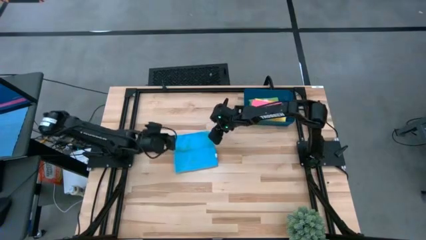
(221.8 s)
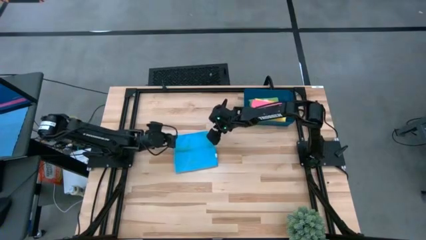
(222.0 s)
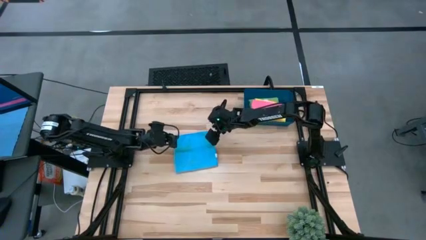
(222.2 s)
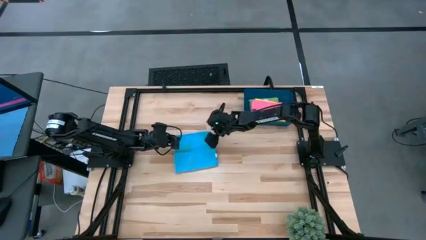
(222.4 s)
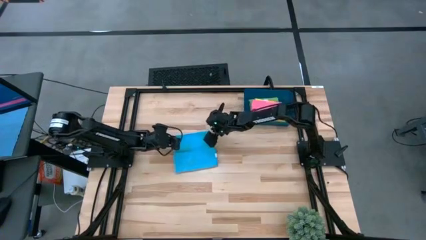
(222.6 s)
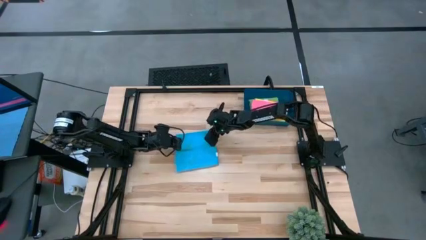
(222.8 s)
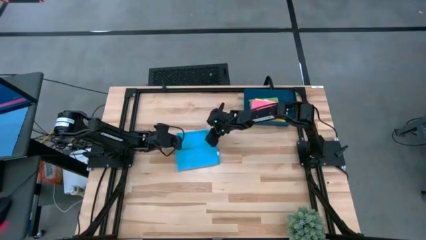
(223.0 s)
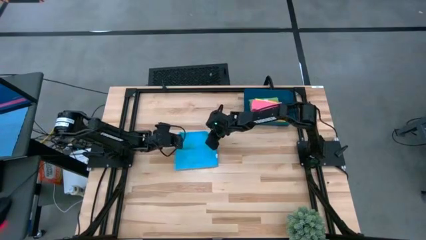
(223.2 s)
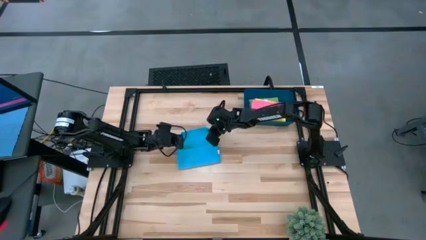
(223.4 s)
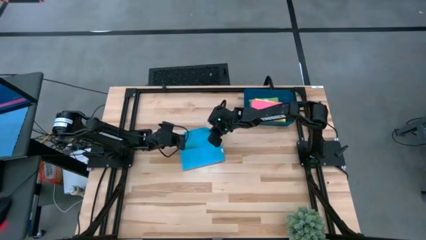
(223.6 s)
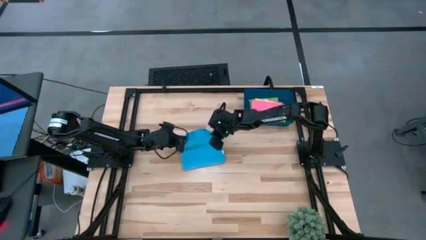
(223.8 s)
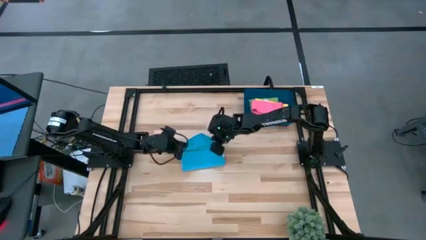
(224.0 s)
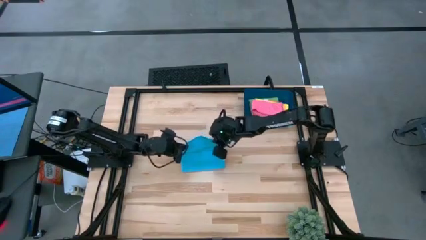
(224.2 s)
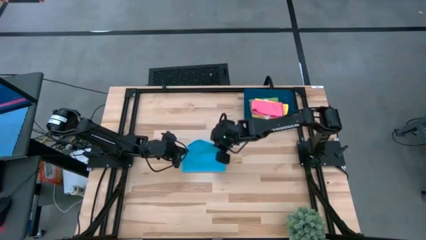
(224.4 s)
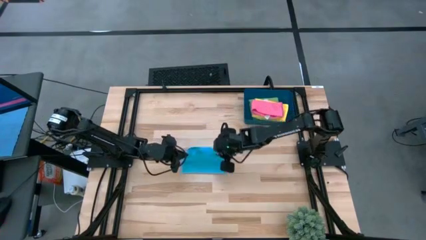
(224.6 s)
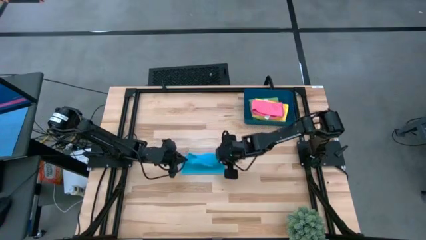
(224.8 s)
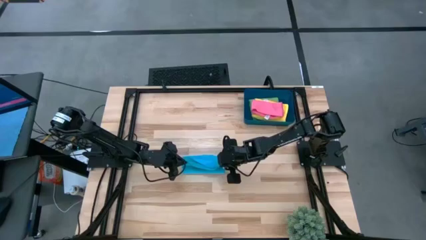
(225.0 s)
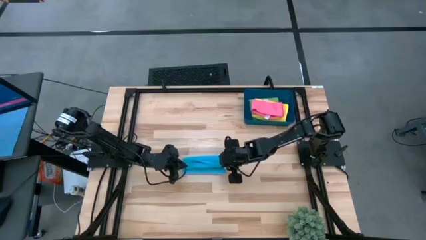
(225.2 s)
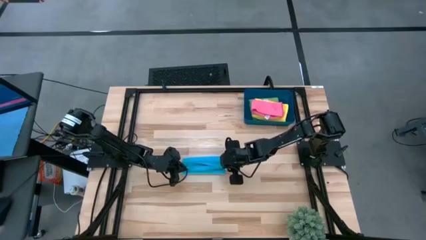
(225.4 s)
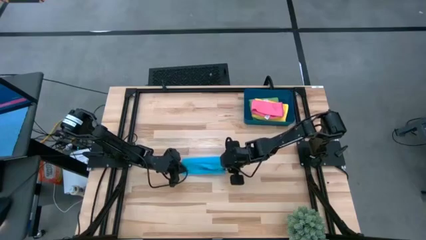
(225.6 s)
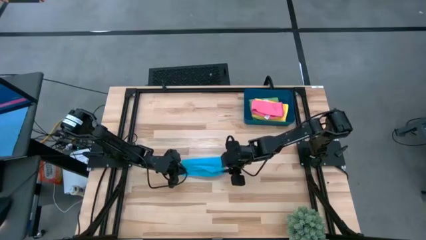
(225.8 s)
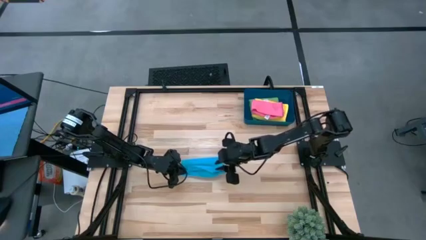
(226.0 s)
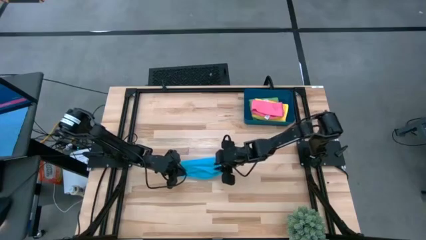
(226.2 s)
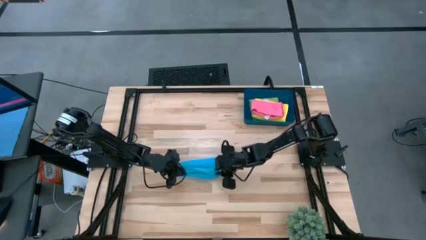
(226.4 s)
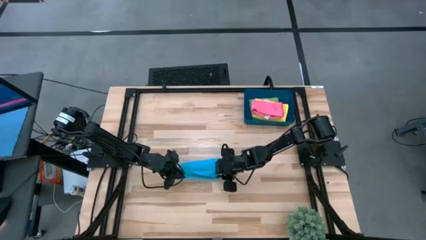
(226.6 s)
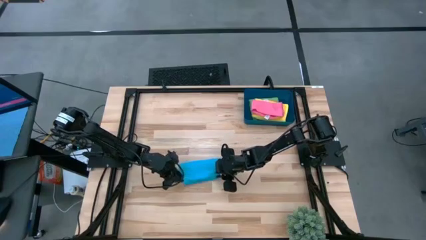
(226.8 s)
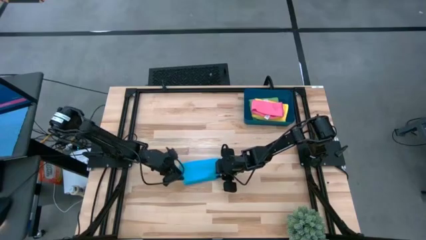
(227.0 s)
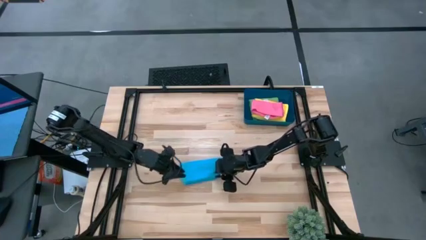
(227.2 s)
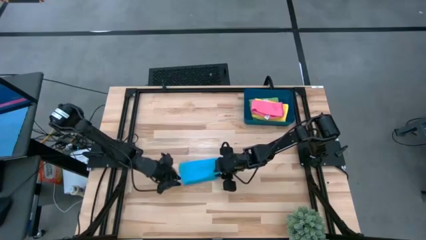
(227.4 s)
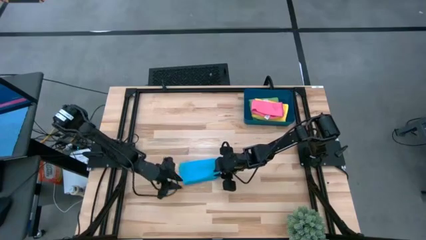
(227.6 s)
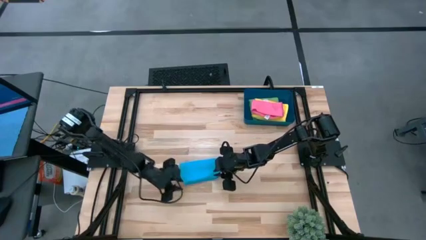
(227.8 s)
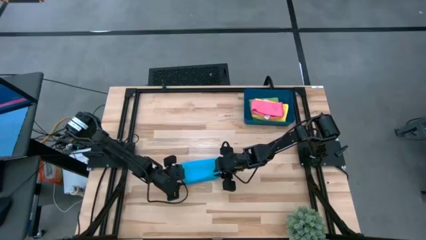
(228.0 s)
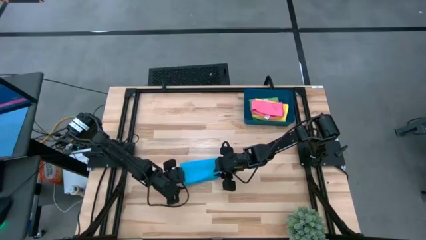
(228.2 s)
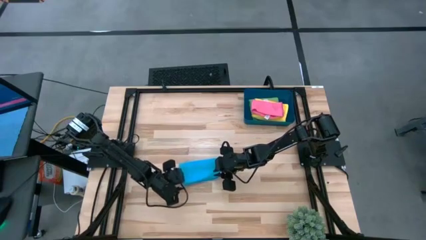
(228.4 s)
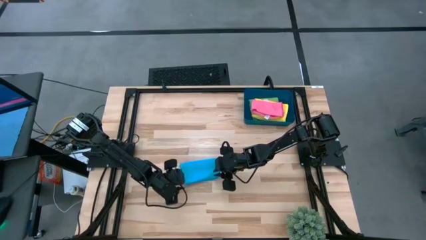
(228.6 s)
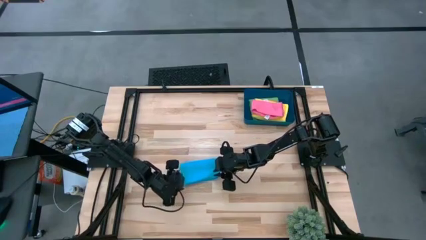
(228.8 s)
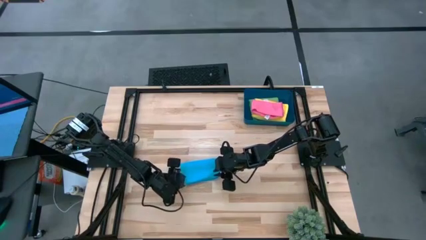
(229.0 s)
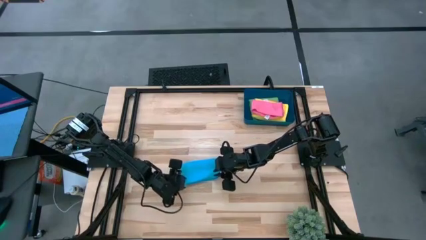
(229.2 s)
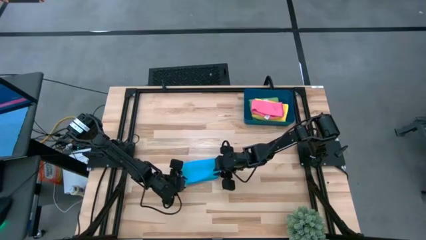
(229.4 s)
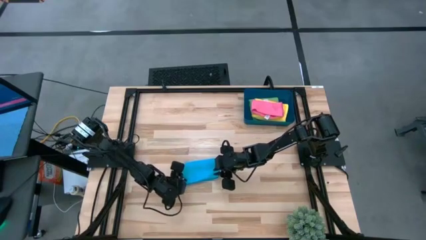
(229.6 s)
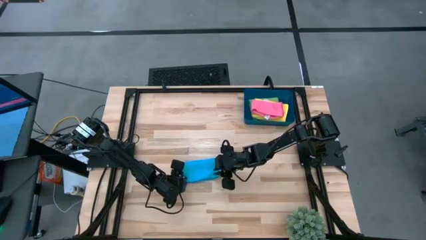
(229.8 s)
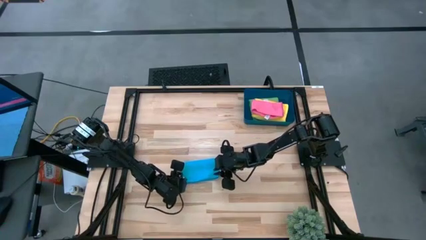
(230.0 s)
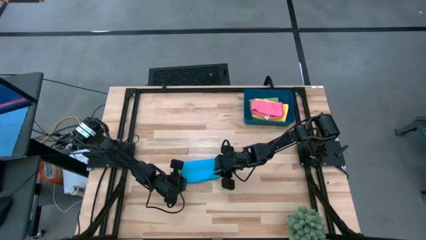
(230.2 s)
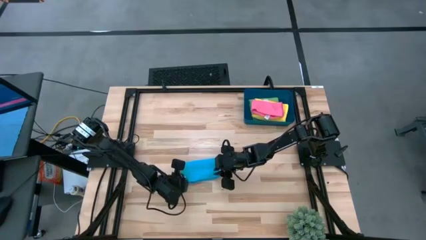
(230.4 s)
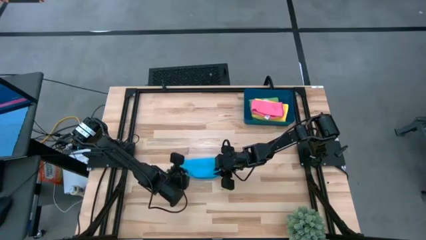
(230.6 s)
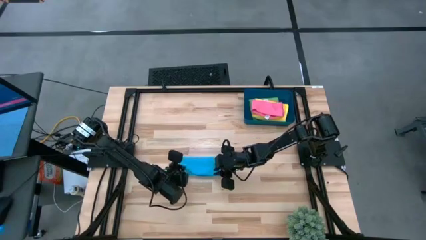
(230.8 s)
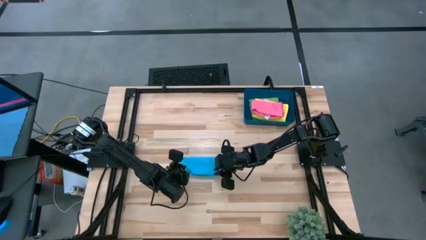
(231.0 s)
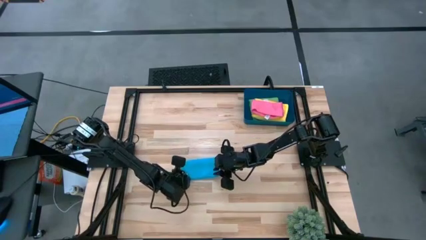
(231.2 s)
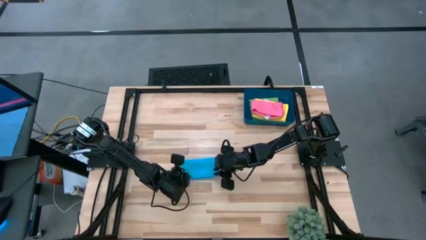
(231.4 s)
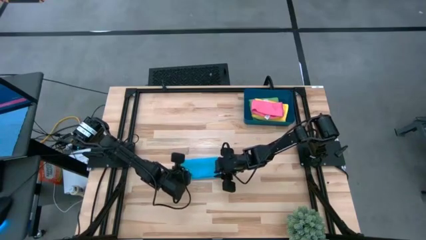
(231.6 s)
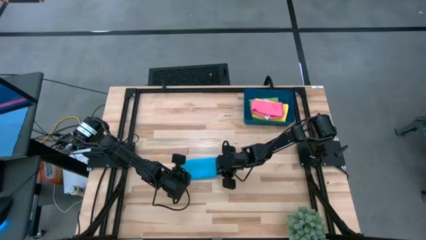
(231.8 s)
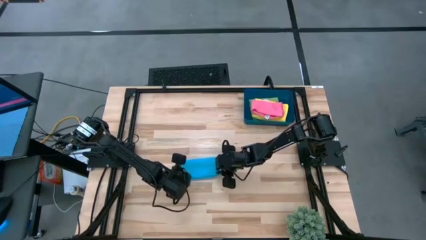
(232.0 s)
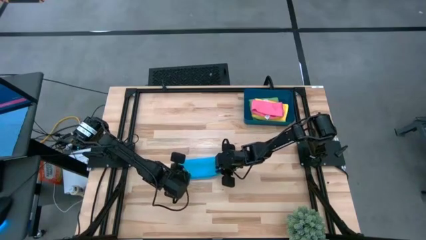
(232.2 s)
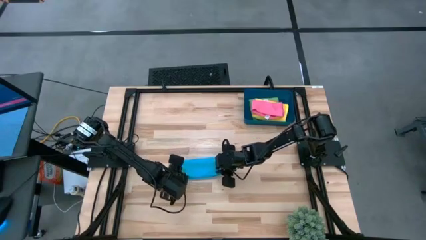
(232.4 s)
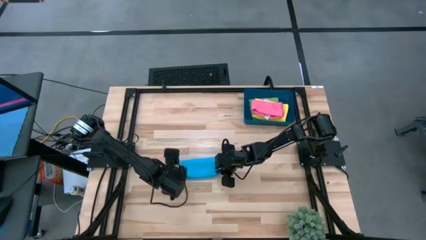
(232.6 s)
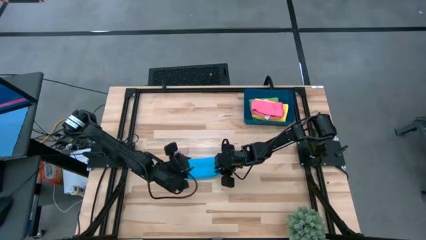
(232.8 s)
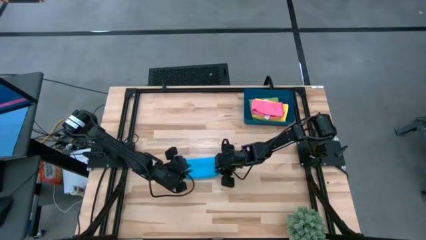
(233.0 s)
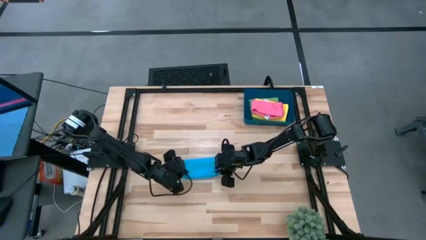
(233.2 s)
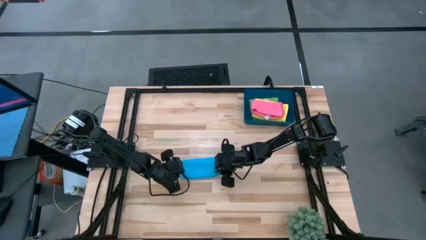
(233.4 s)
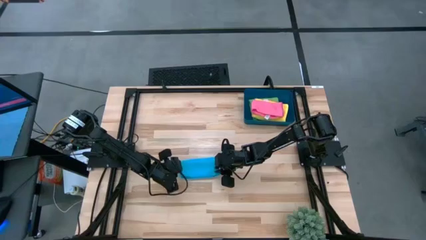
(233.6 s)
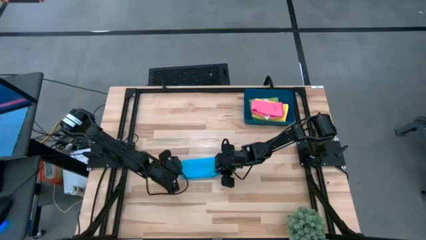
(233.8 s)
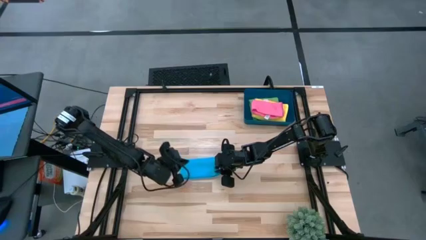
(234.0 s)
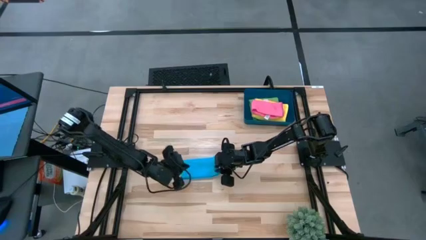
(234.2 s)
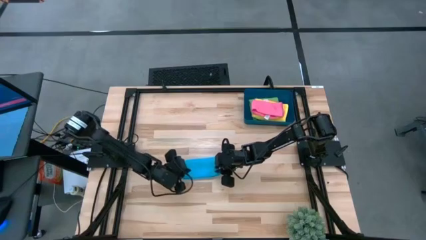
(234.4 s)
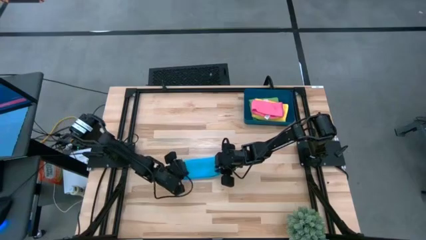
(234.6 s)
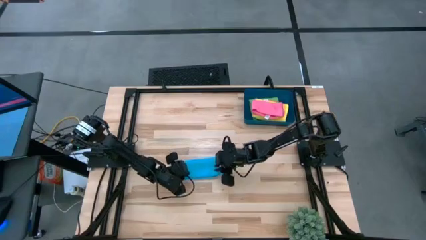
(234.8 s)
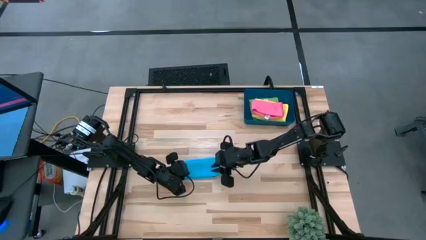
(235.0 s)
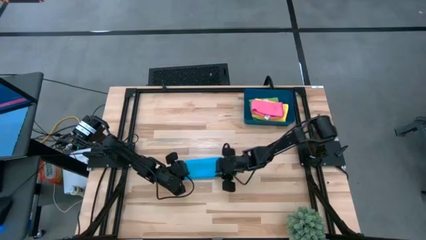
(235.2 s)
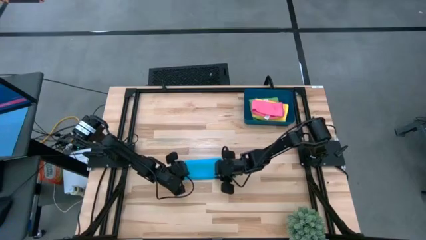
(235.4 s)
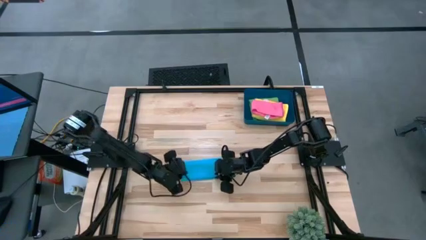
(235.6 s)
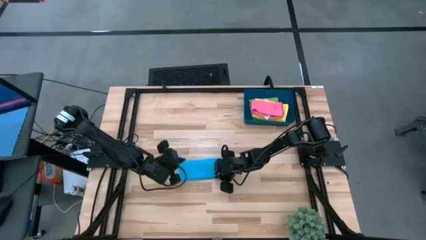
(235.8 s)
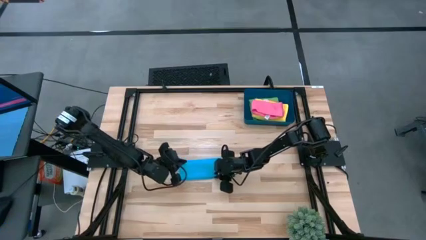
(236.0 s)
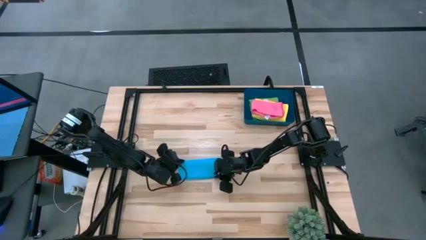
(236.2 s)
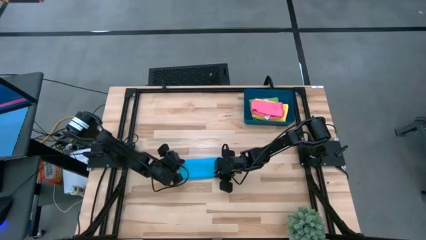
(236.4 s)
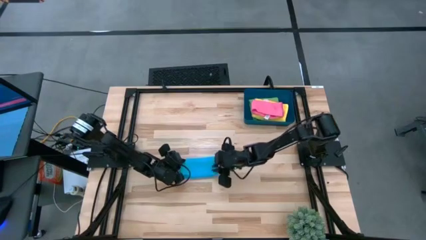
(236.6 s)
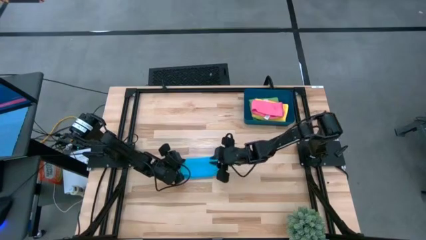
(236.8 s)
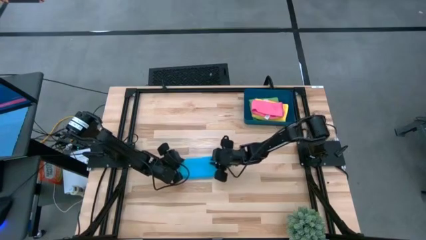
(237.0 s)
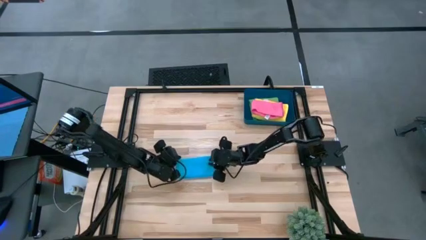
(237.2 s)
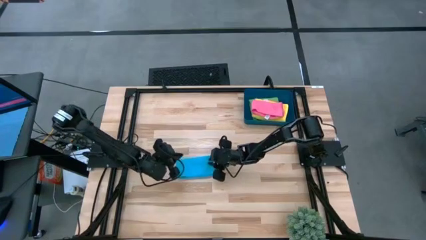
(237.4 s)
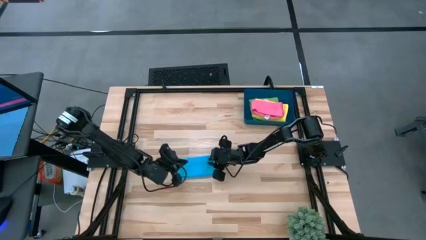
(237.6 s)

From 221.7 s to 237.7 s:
Task: Fold microfiber towels
Fold the light blue microfiber towel
